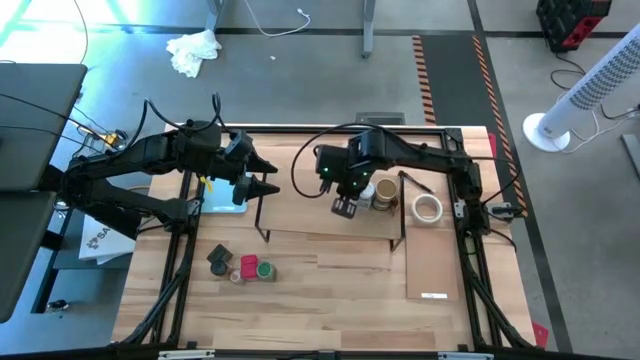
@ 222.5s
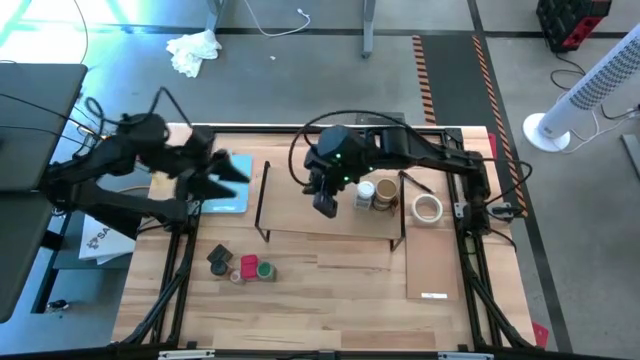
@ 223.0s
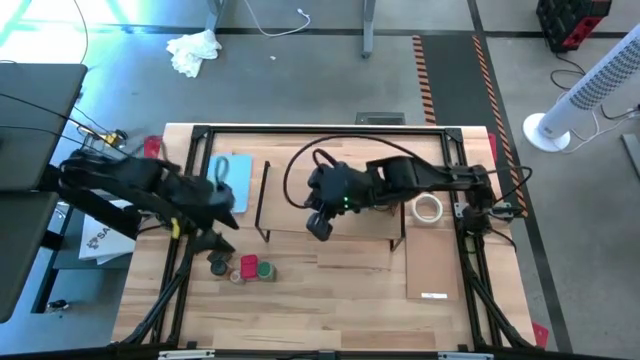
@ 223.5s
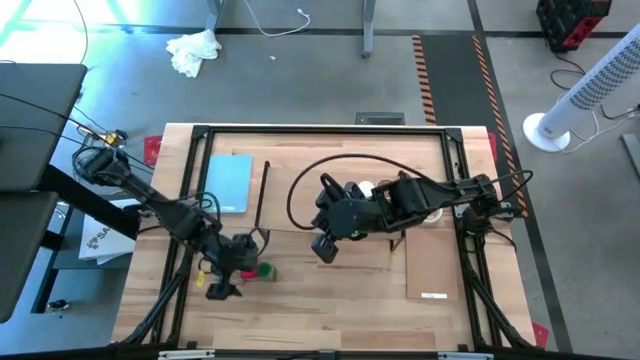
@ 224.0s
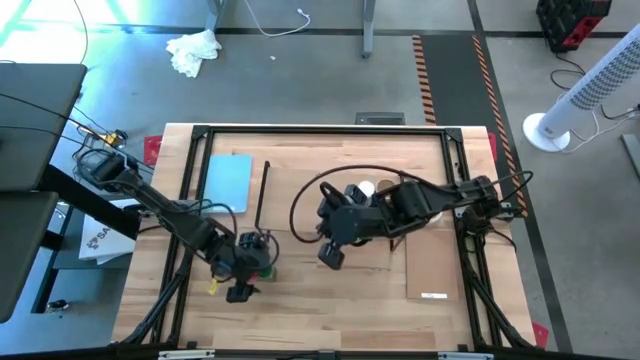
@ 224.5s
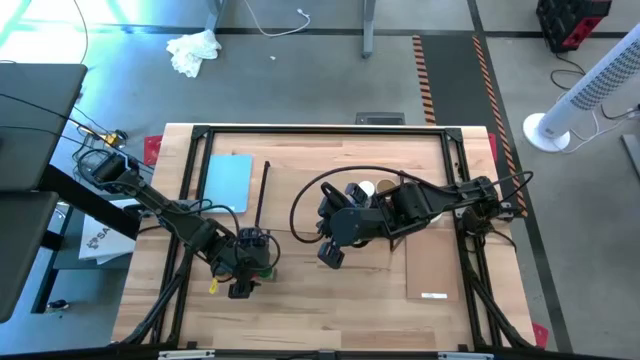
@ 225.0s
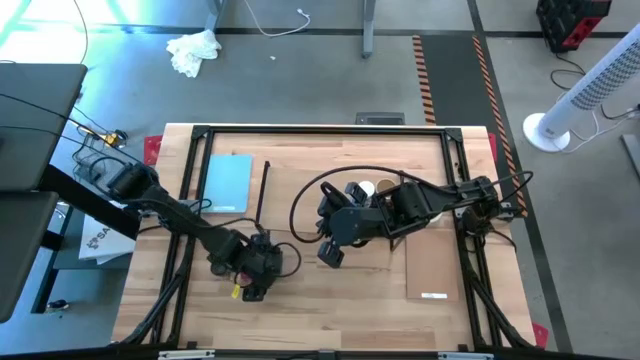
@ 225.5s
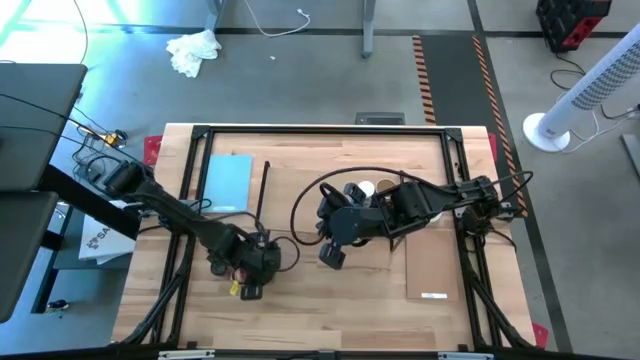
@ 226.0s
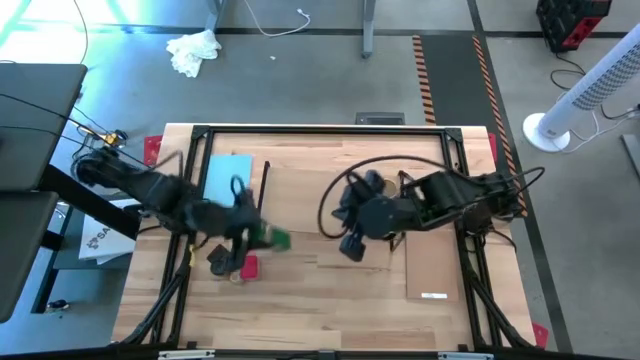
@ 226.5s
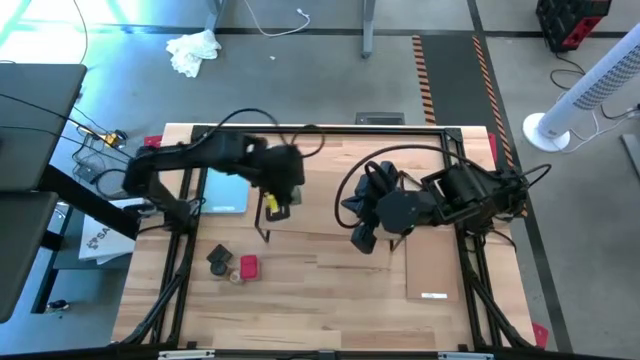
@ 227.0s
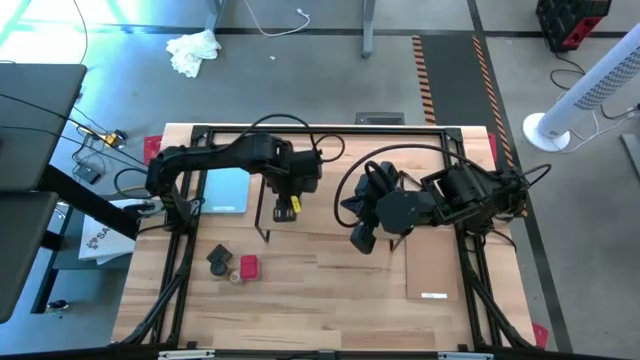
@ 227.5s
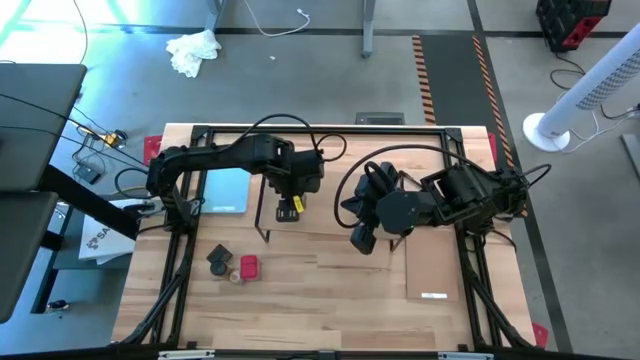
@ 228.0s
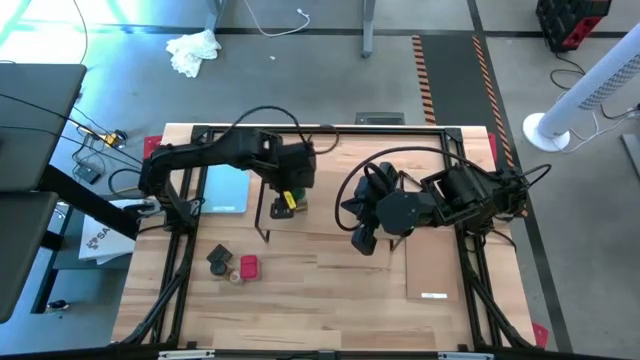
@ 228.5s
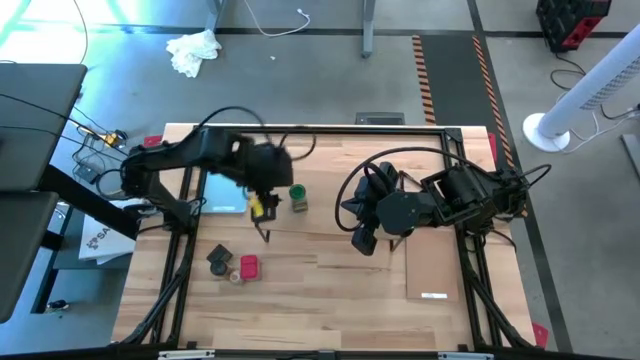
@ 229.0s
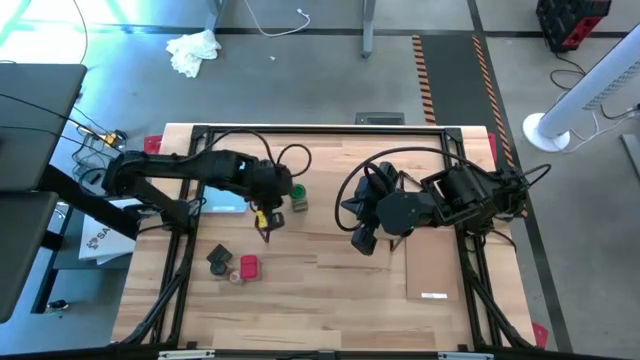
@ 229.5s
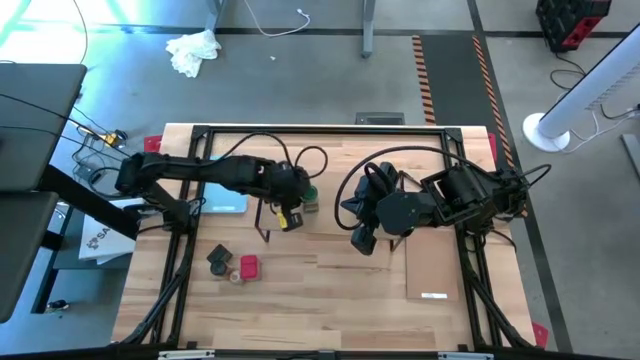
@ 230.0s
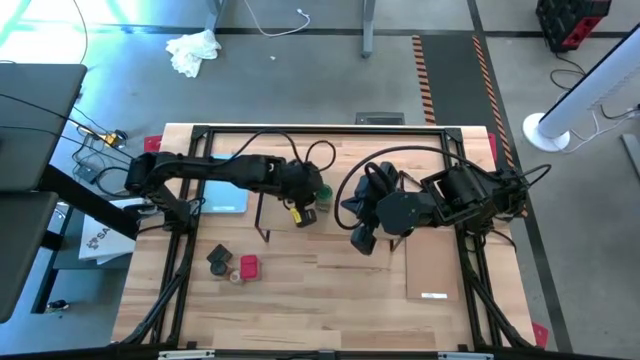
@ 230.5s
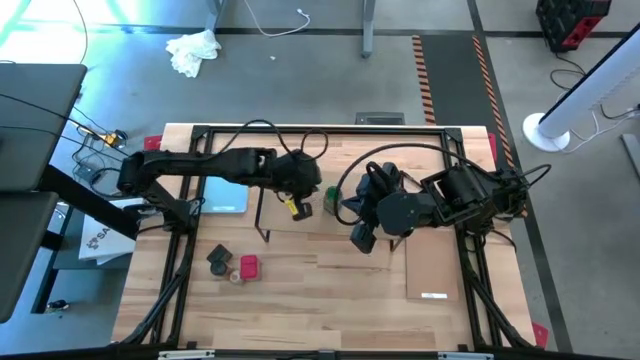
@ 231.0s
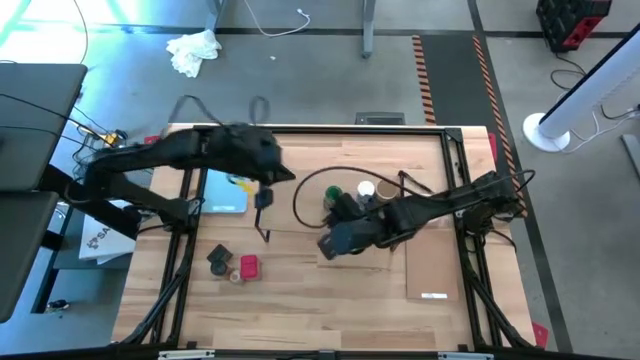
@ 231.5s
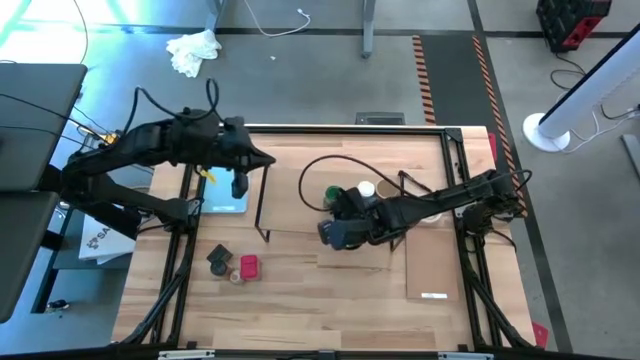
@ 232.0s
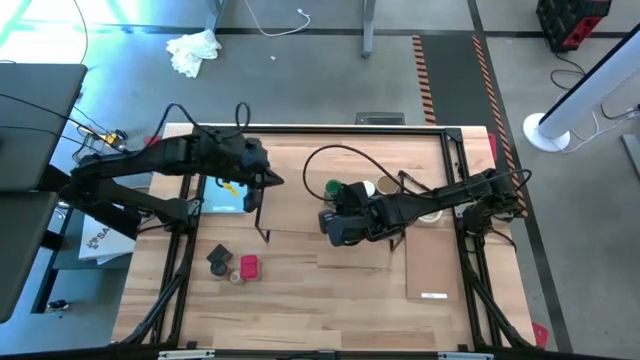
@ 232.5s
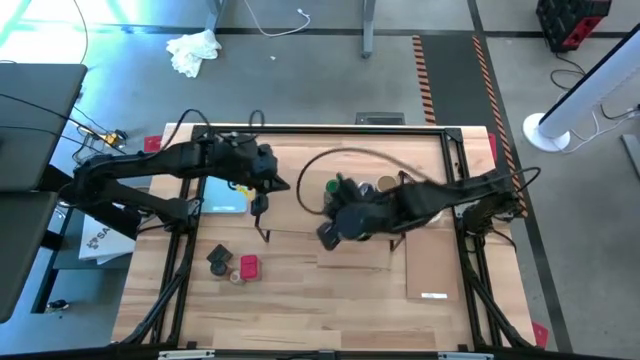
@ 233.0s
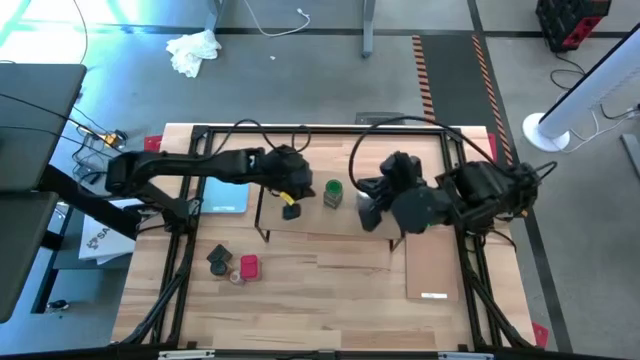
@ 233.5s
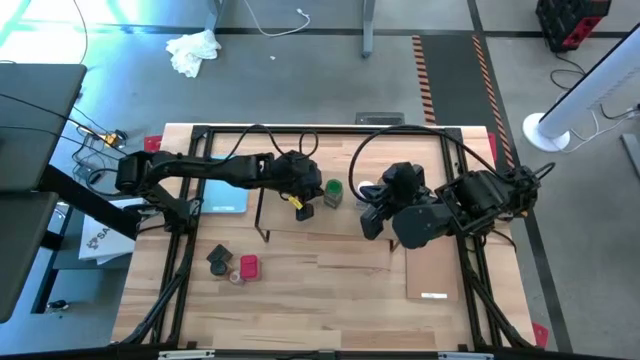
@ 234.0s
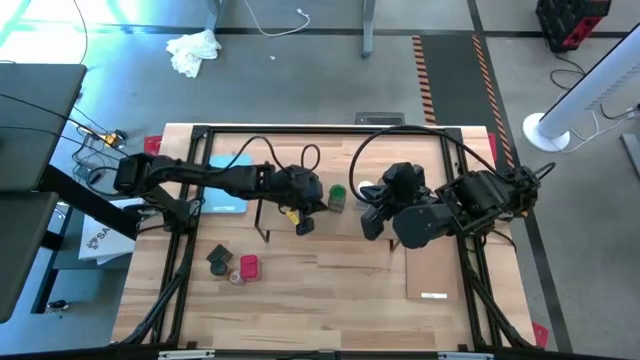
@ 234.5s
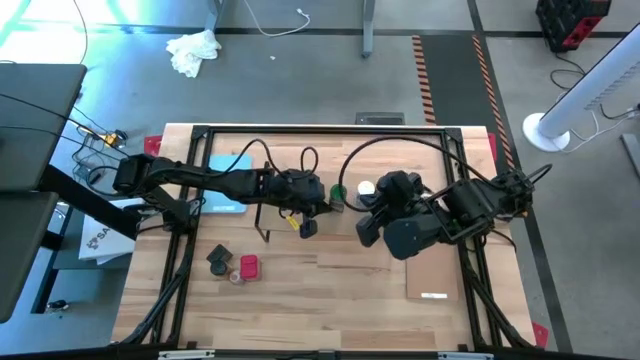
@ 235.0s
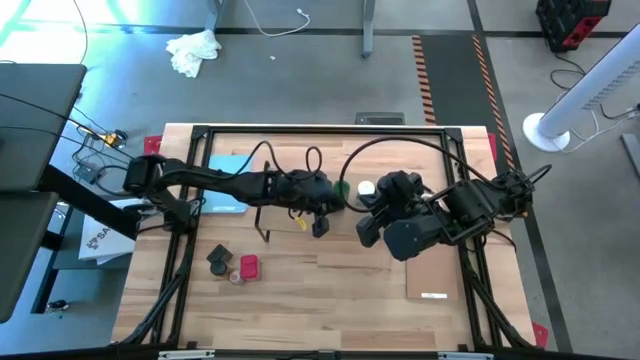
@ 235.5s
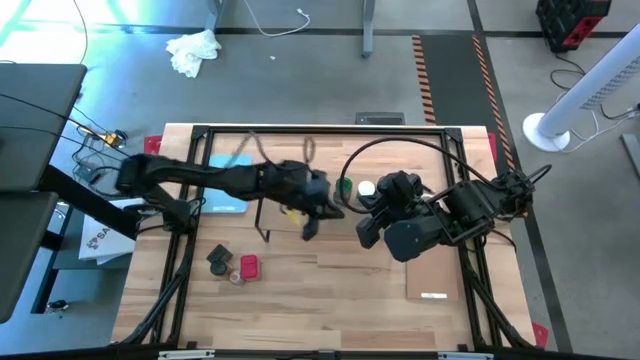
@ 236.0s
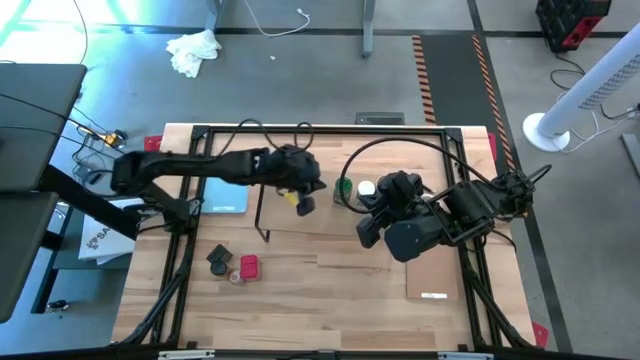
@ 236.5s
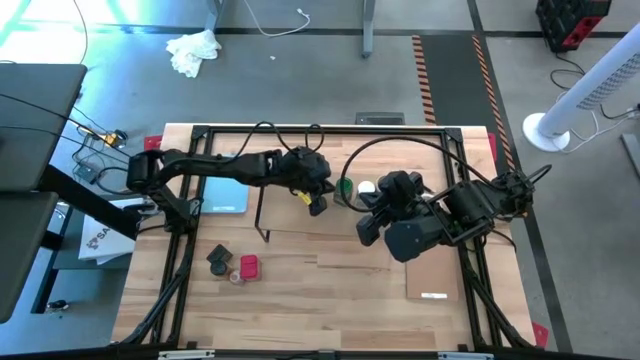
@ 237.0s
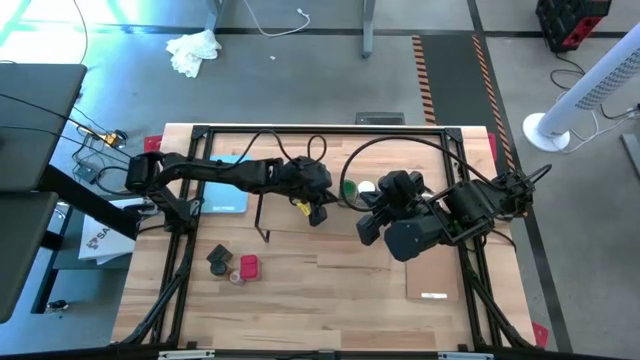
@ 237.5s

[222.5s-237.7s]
Task: Shelf spices
Put the green seasoning bottle on the shelf
